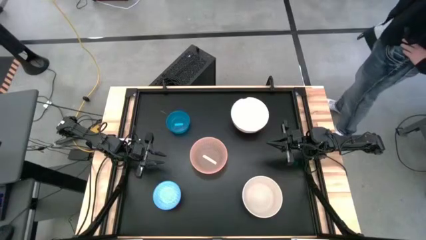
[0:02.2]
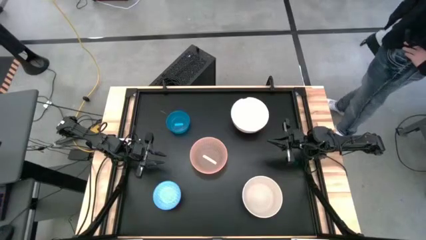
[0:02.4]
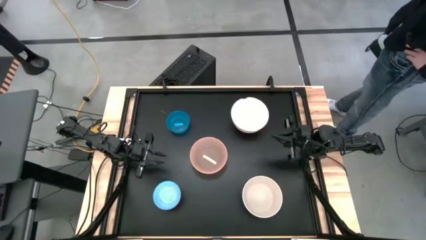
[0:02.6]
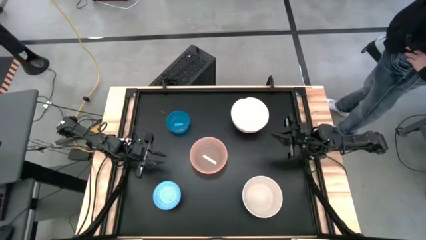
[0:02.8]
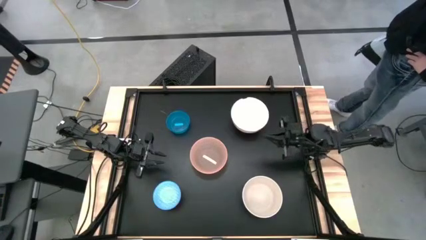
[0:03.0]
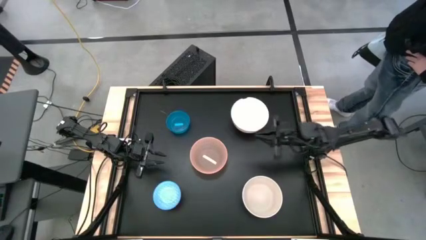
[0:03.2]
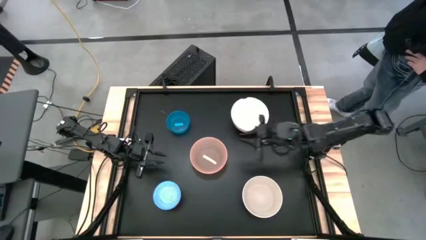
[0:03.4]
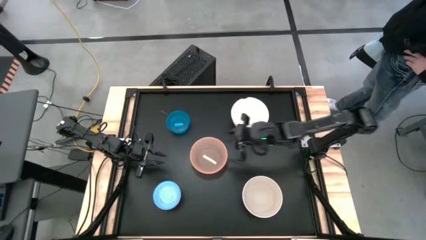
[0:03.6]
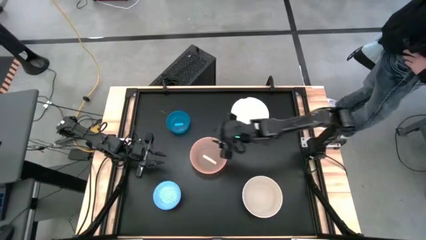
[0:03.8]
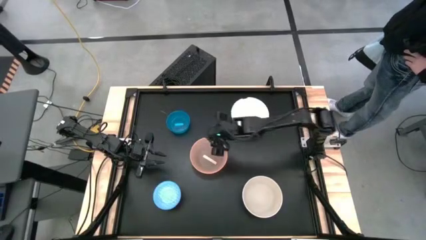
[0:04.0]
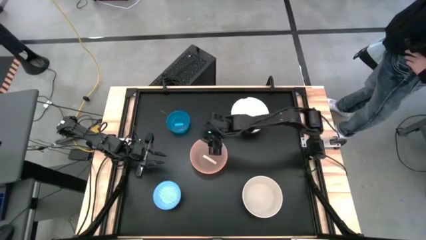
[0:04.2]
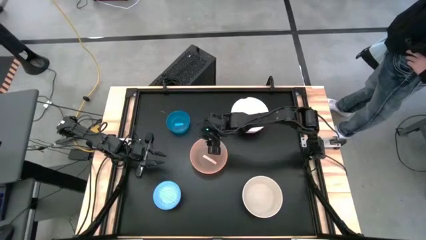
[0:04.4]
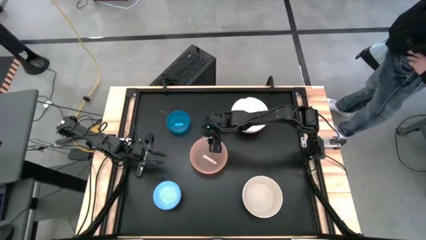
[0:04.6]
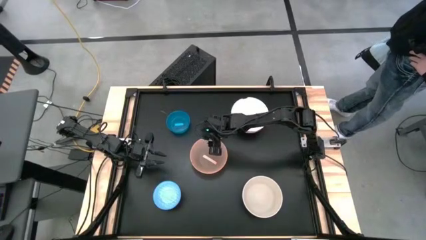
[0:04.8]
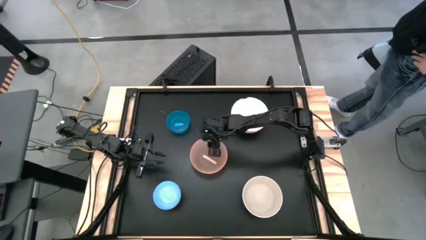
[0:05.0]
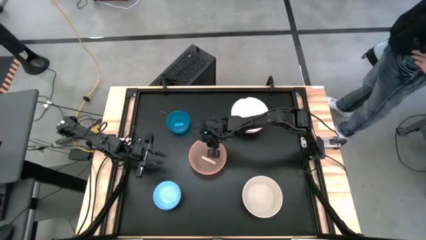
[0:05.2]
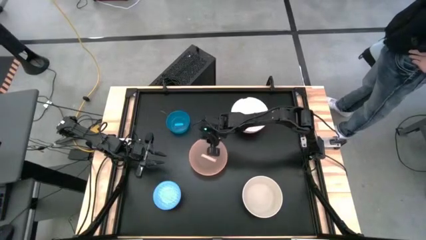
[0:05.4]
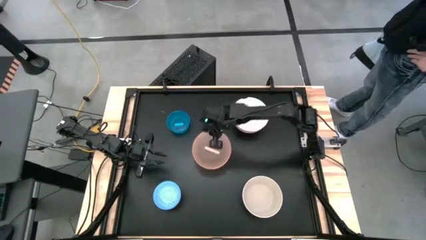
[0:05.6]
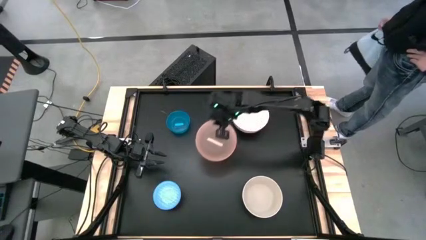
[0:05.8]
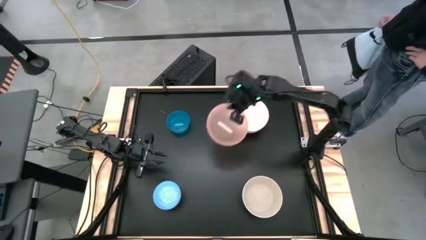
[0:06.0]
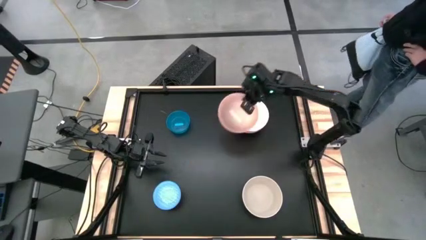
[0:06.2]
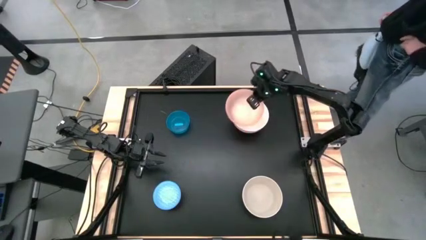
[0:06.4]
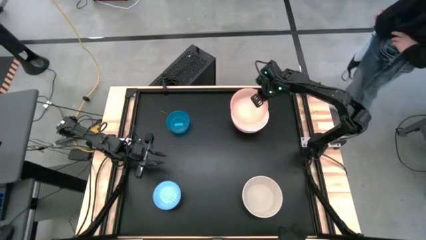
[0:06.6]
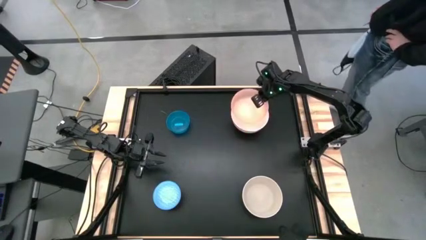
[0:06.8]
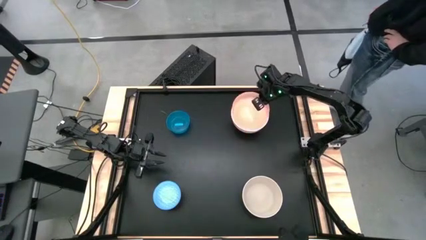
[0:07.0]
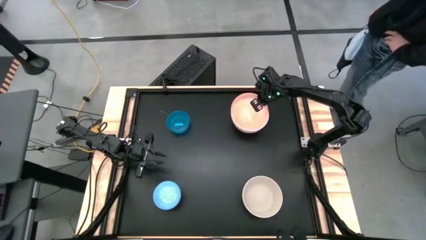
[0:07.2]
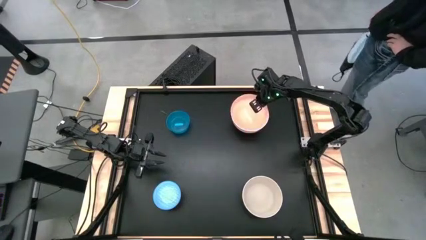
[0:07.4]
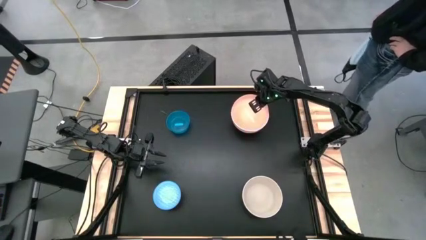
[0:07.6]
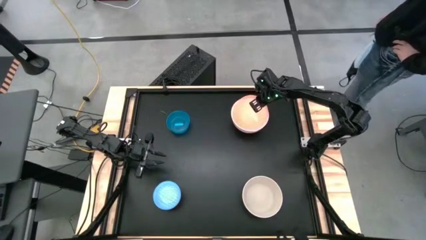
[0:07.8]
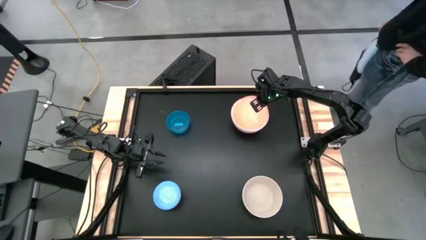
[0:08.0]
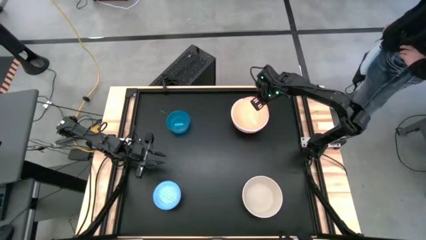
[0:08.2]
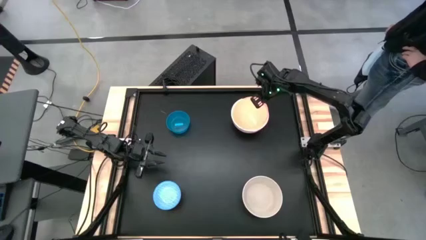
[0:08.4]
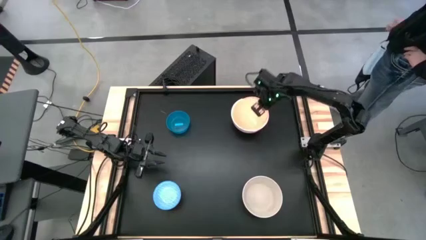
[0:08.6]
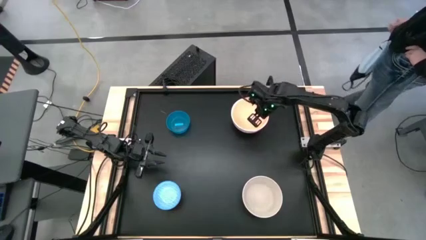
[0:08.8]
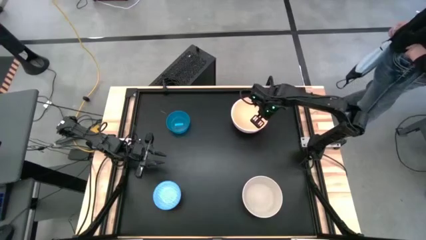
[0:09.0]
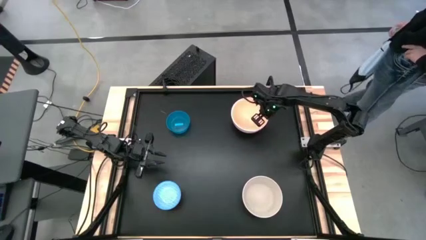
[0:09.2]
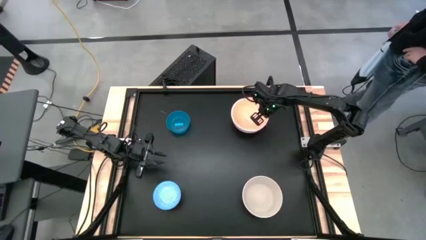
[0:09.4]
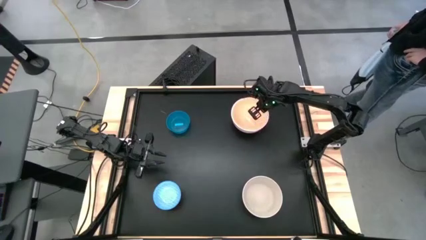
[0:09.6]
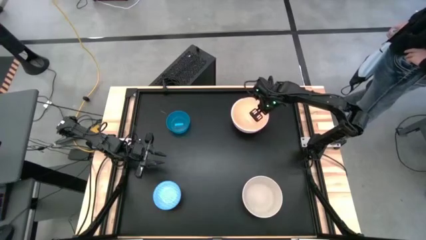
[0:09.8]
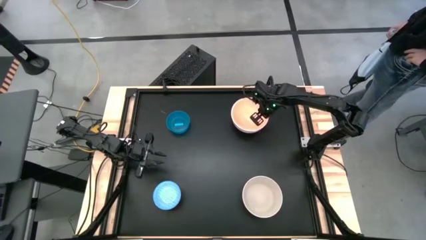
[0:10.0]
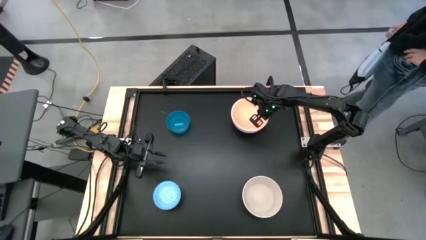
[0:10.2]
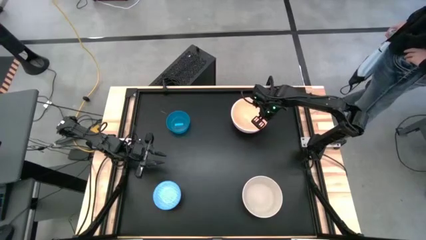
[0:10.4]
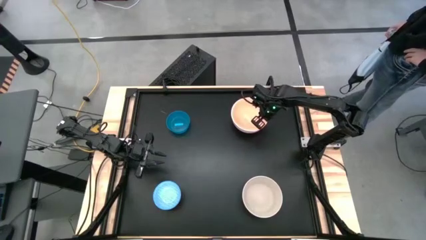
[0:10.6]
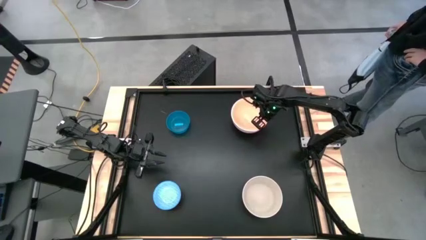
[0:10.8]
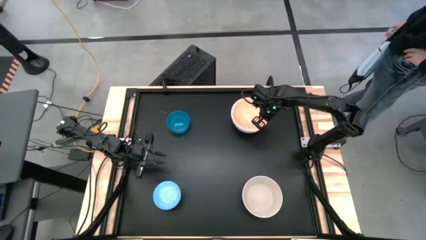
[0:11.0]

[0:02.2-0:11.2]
Stack the orange bowl into the pink bowl

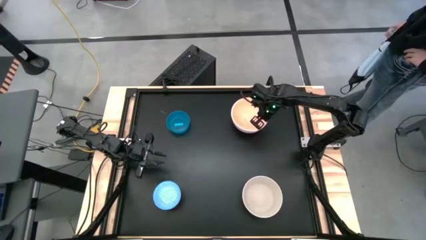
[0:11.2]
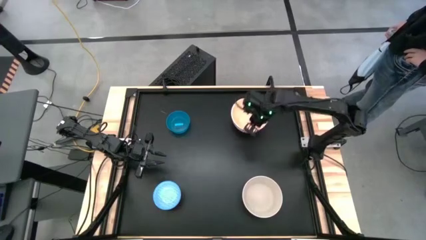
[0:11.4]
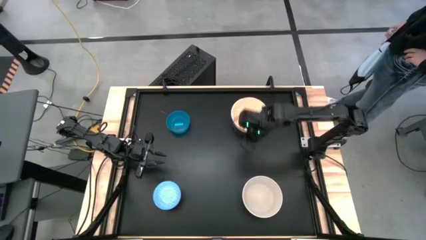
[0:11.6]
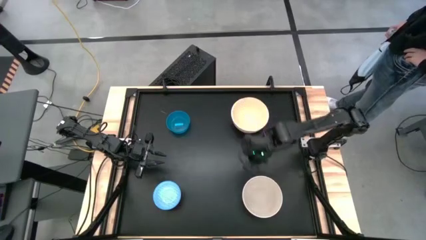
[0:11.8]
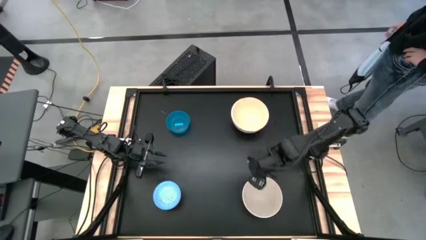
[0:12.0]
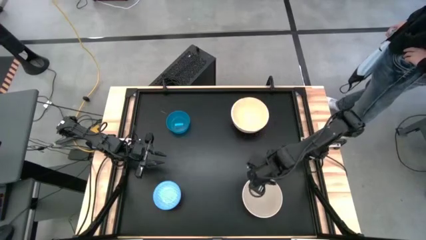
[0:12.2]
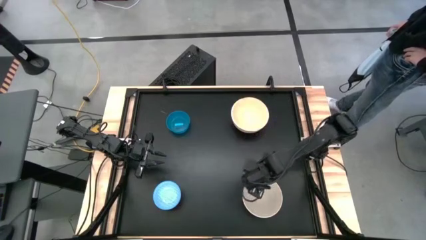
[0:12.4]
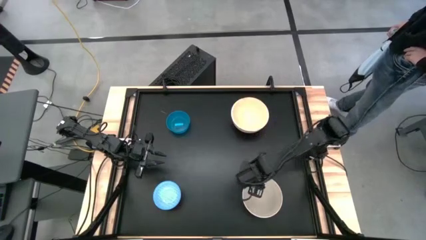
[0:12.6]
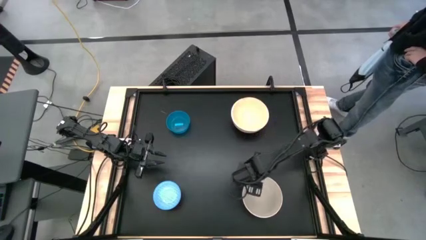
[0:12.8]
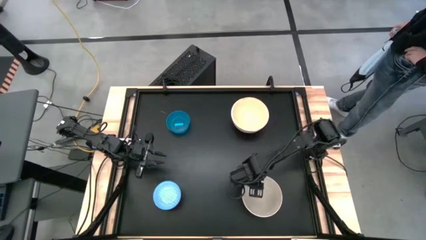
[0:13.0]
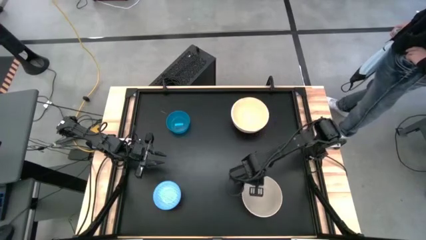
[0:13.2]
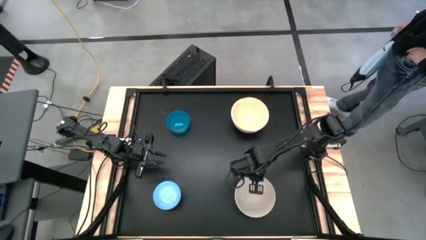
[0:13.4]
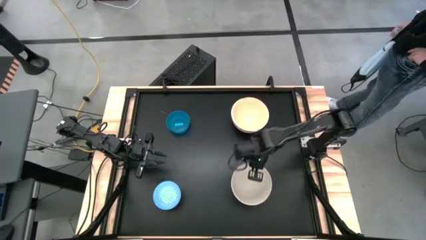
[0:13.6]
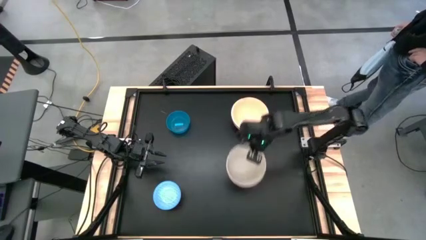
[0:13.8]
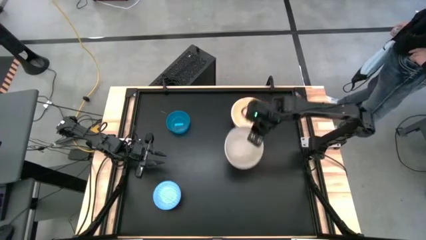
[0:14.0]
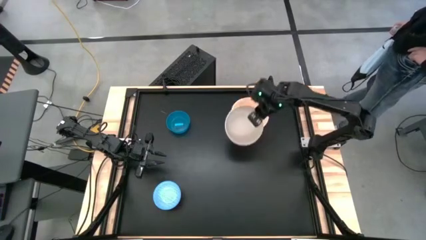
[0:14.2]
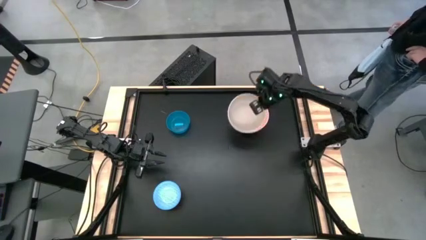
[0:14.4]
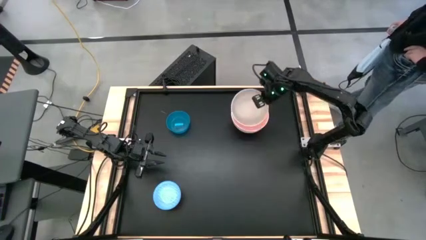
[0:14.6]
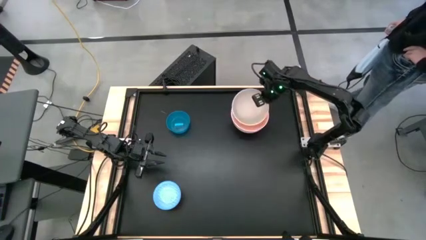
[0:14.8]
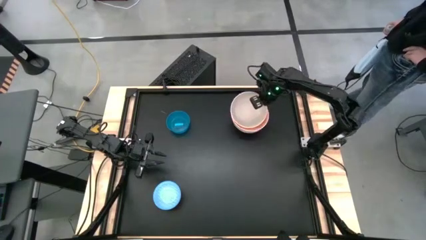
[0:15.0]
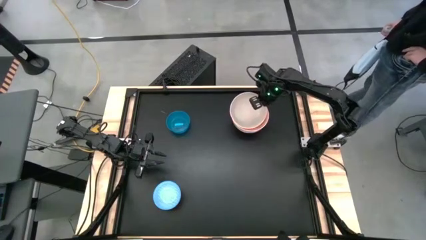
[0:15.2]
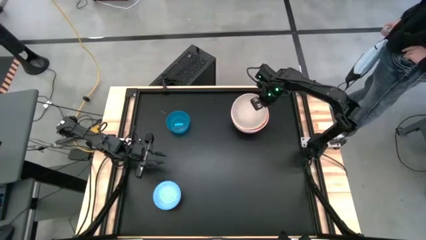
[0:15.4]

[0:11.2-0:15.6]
Stack the white bowl into the orange bowl
